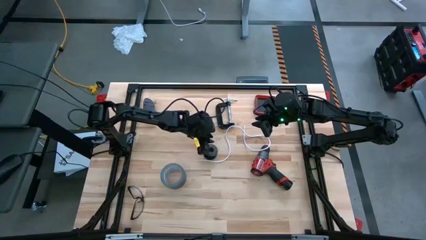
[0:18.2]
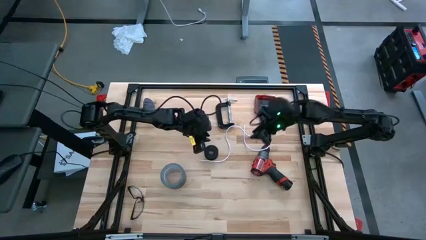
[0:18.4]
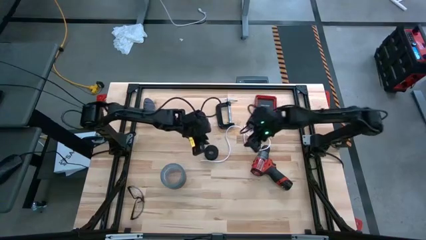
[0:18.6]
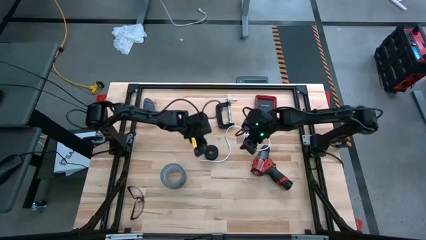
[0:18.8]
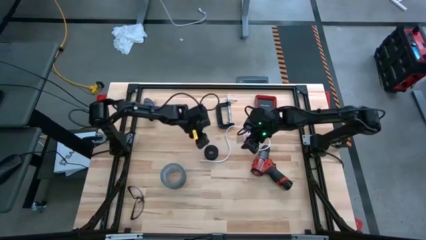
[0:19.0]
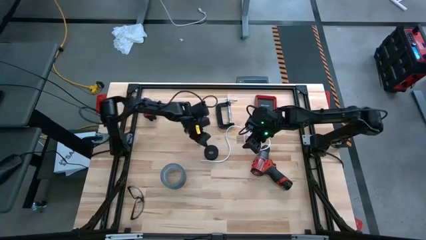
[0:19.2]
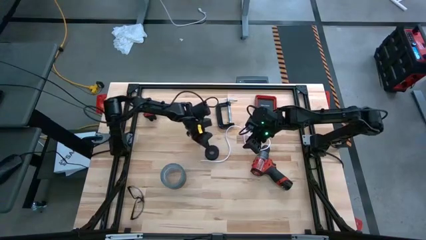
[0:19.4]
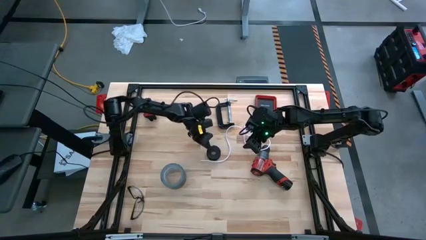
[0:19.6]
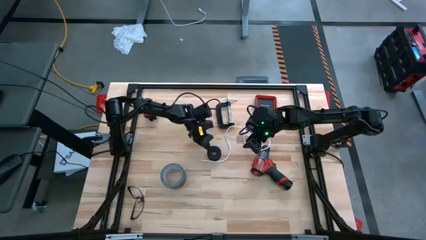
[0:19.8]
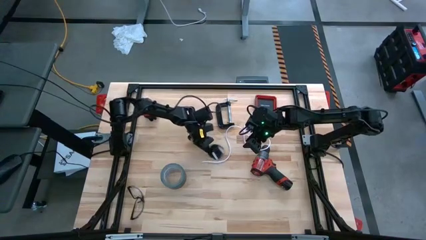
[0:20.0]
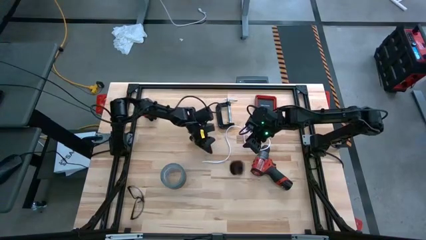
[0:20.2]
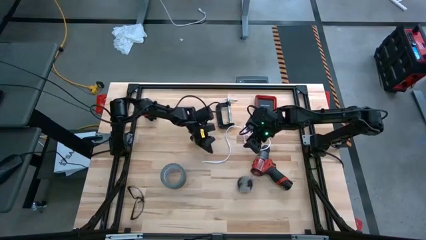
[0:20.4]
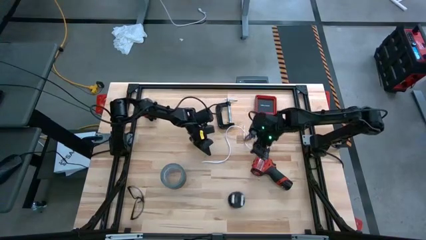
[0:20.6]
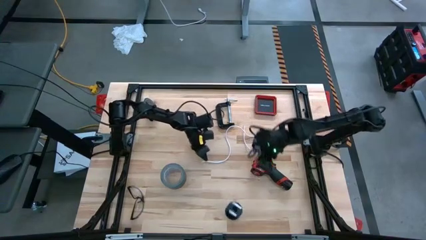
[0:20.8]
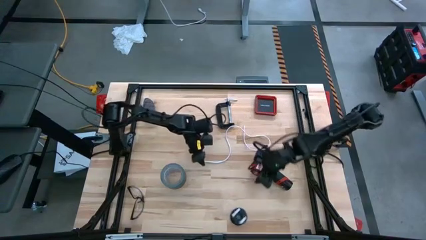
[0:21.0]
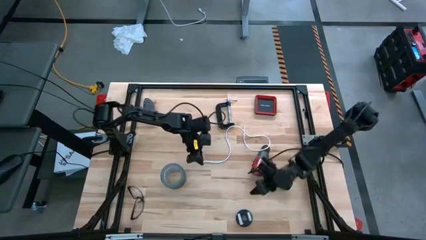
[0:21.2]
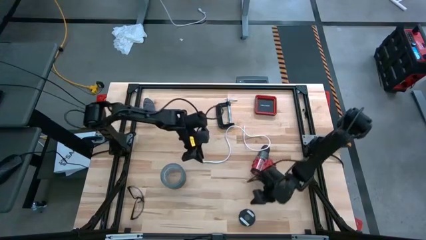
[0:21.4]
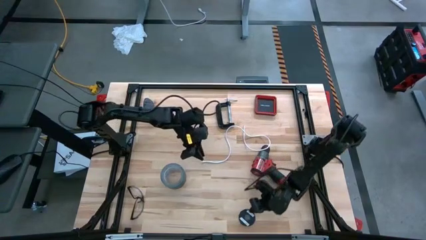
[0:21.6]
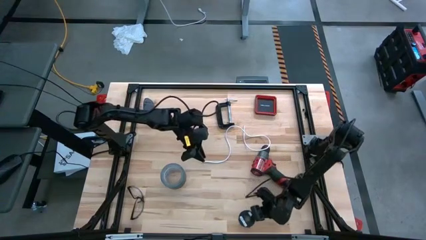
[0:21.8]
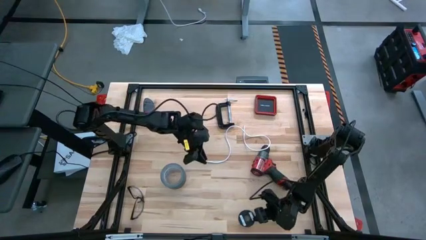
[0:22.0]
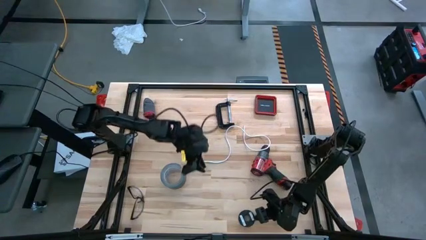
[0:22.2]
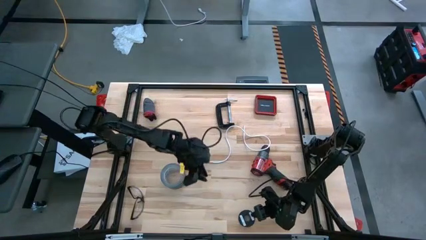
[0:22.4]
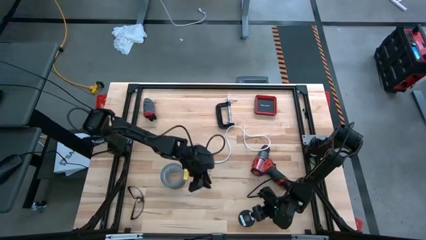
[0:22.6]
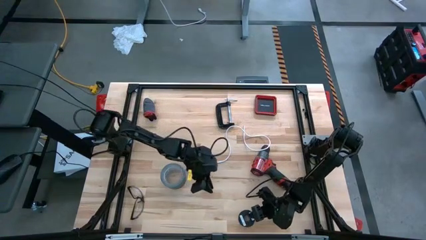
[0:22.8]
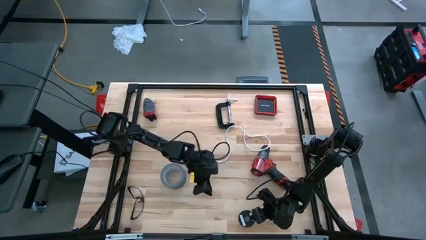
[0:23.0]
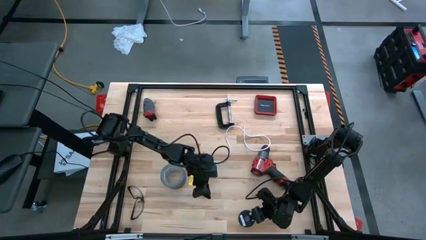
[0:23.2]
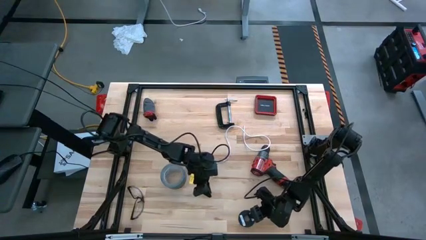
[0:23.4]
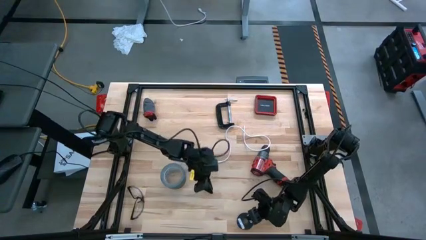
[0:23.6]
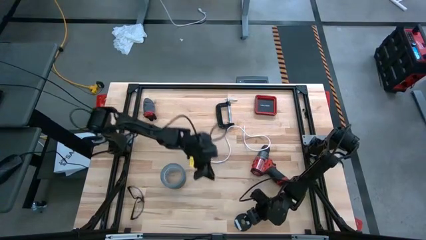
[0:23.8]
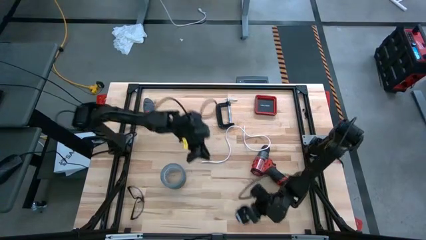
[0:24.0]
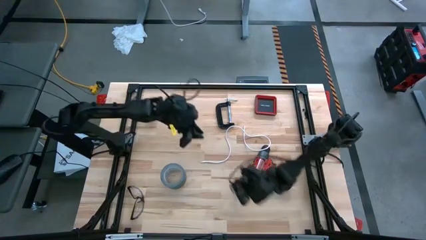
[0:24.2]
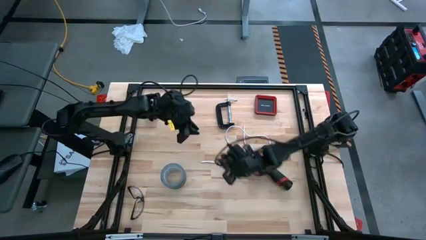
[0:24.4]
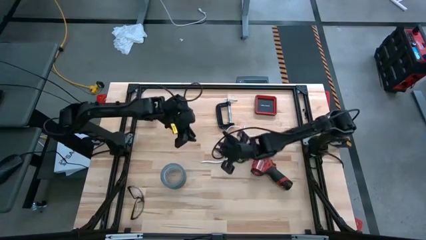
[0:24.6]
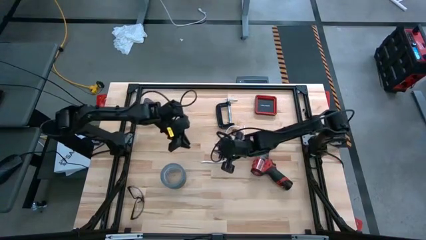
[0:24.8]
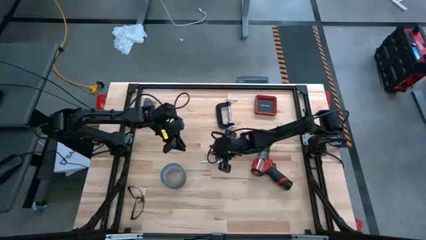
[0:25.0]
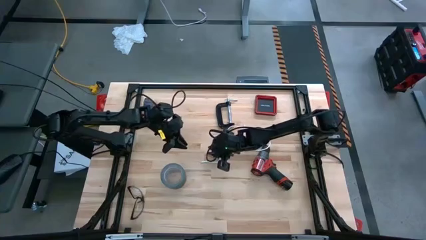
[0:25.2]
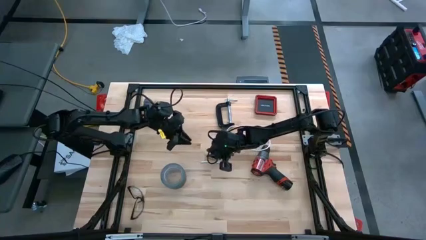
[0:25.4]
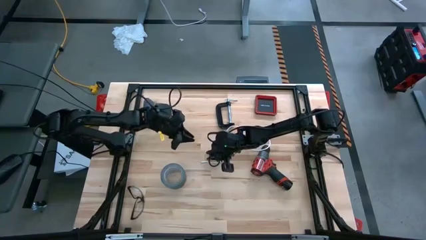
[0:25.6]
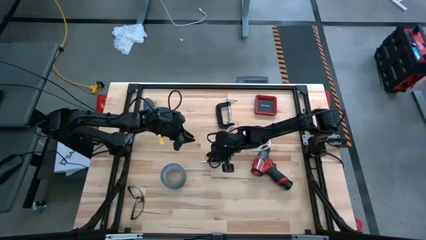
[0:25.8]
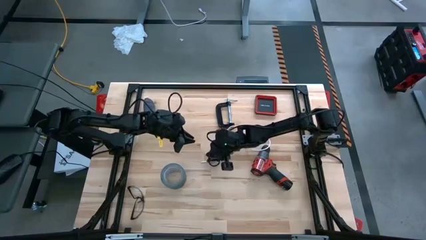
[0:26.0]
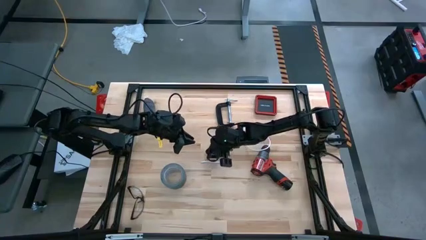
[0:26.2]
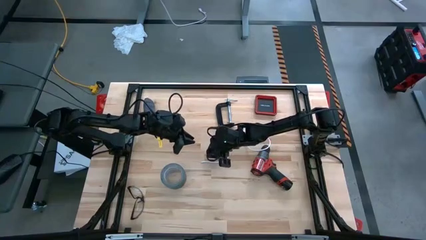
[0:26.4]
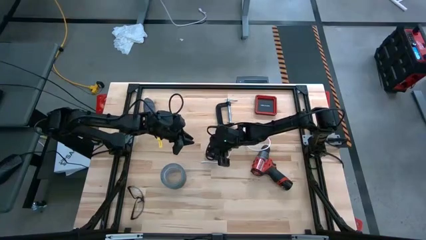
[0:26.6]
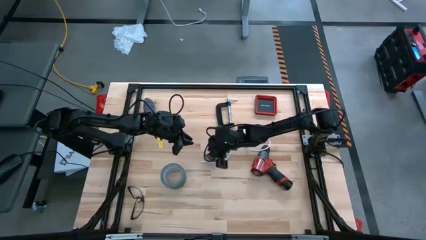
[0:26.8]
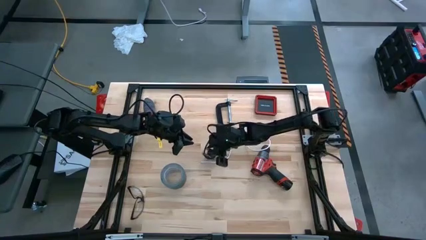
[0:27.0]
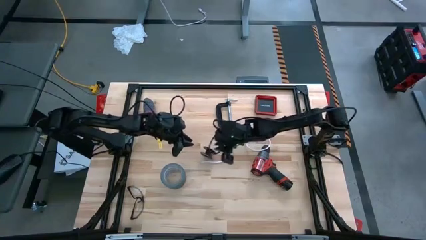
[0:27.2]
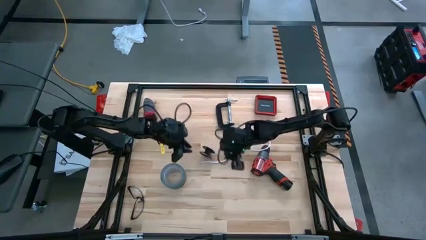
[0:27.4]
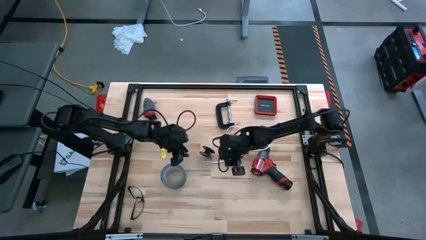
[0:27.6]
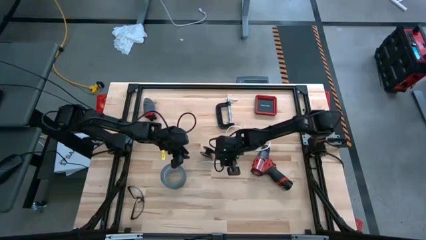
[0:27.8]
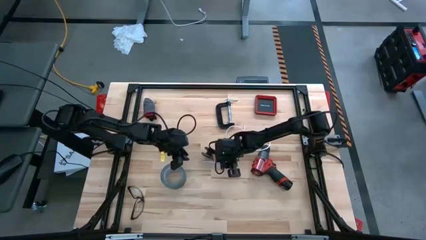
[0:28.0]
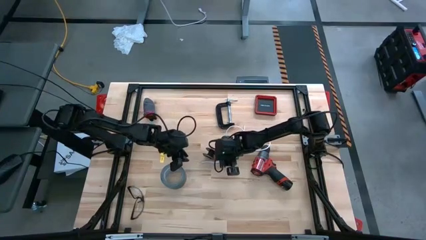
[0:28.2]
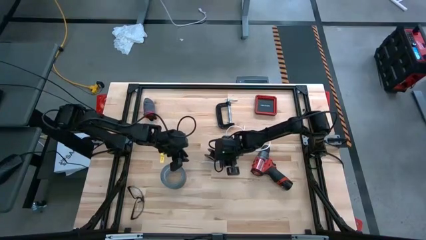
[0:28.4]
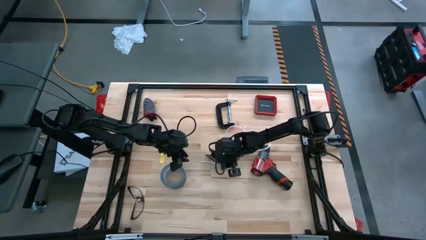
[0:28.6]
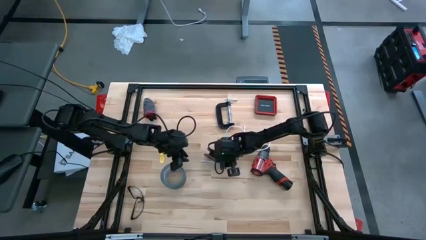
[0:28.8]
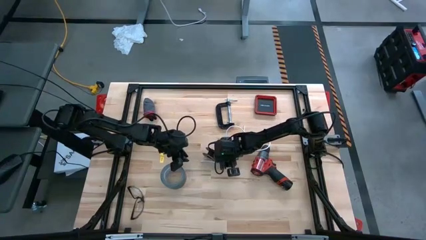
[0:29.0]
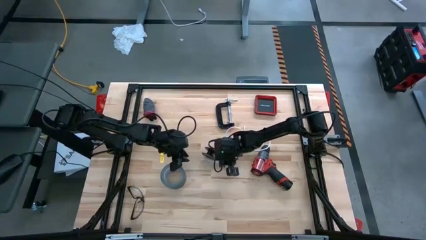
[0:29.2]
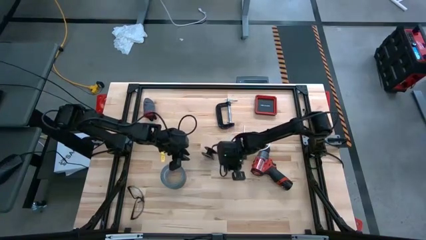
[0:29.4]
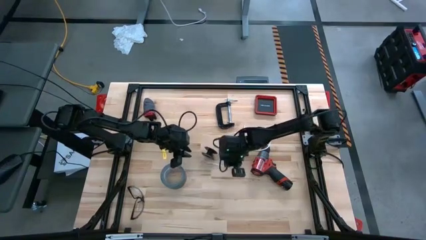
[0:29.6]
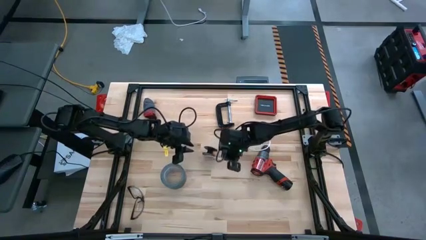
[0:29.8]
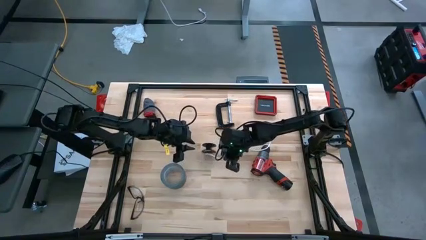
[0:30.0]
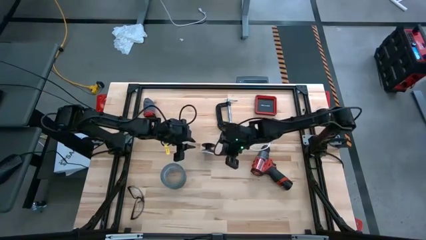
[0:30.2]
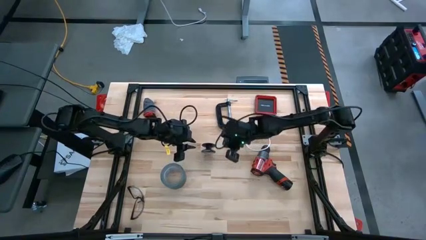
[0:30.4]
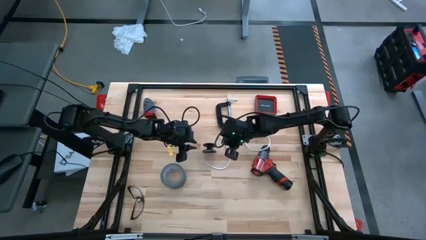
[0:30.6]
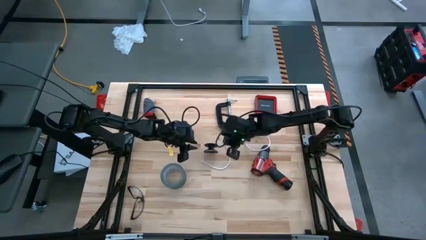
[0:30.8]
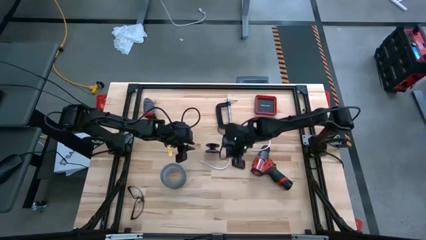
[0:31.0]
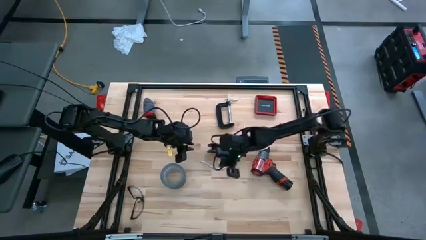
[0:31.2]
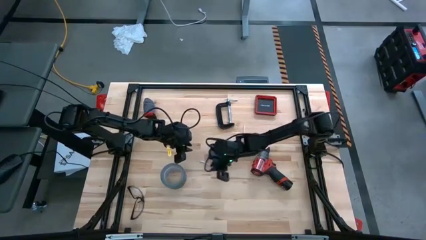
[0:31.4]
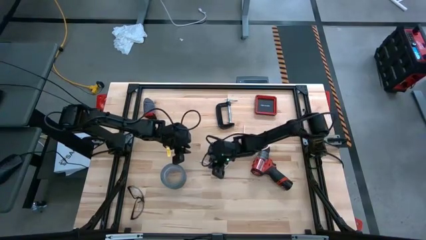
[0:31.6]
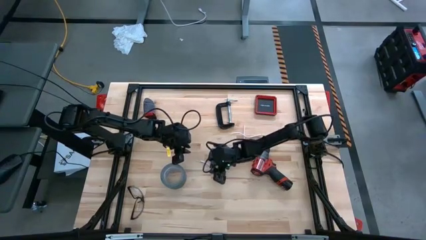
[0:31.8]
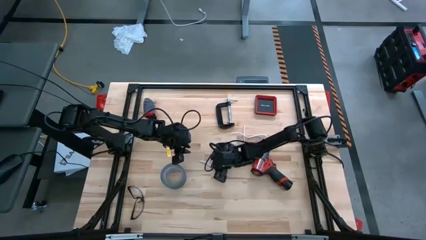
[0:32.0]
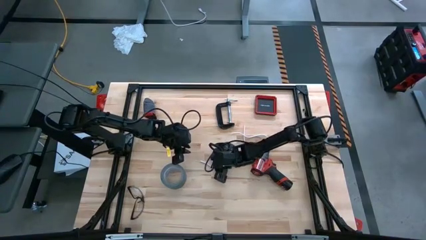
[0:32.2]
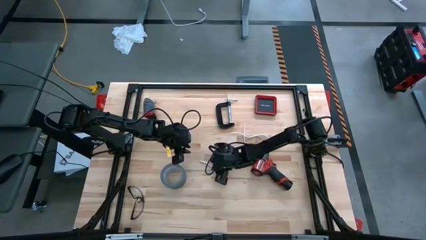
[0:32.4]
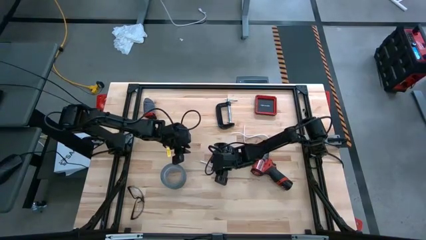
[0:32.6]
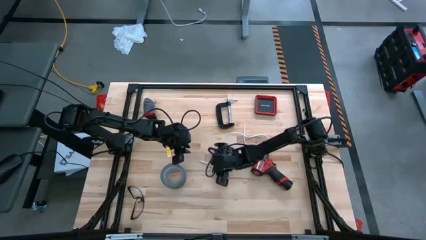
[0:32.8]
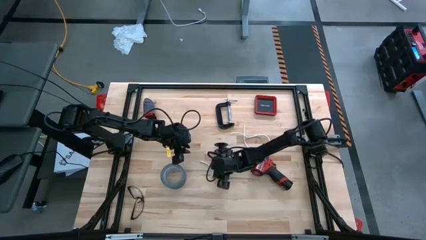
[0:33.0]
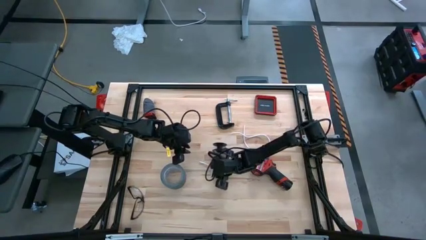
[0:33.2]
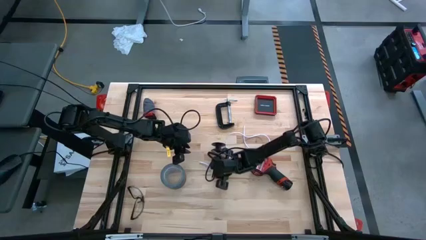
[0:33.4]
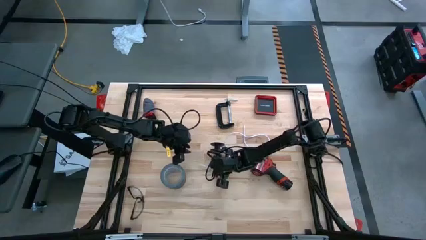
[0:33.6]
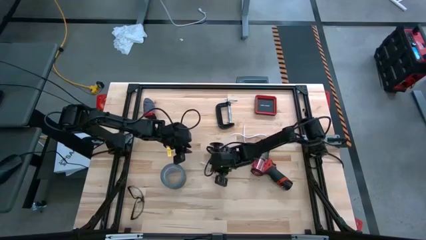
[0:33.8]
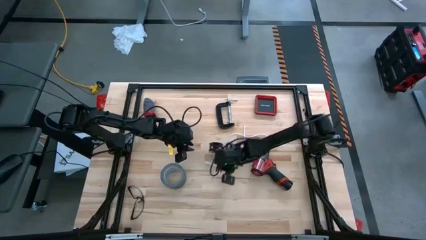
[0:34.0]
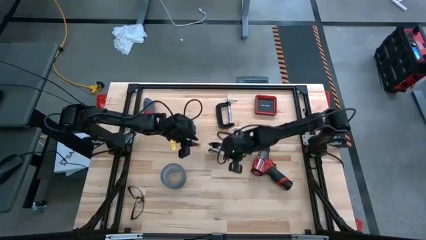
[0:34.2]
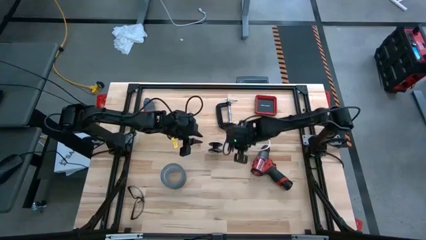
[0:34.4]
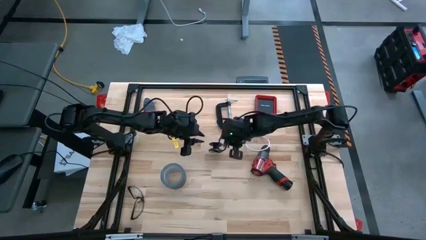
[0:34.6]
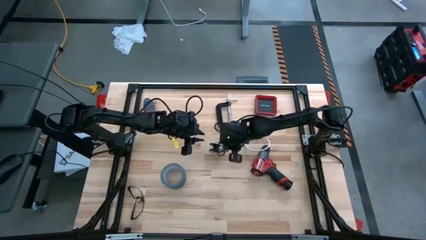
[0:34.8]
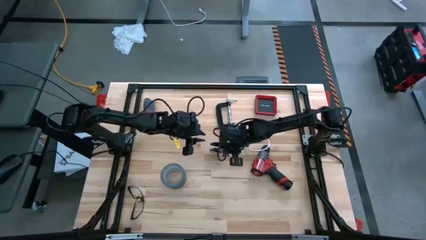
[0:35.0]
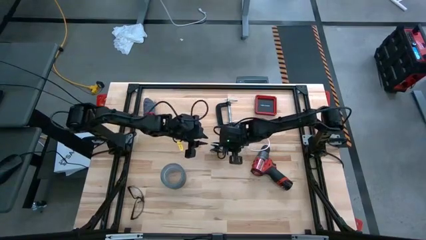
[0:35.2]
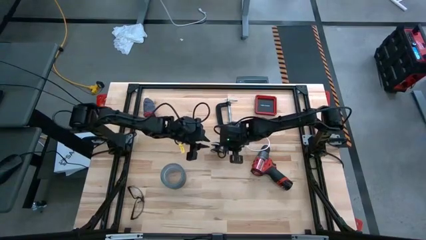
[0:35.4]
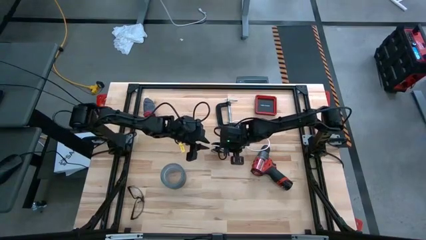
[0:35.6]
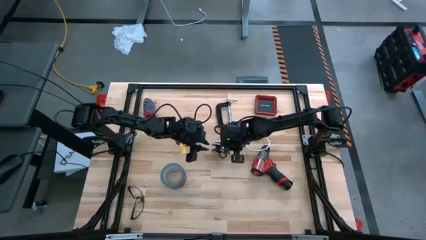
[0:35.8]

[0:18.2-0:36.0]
Task: Coil cords
Coil the white wire onto the black spool
